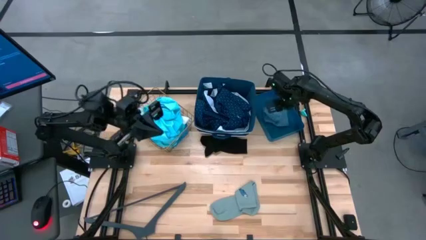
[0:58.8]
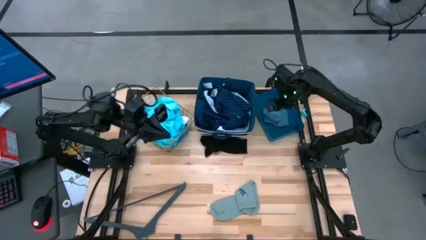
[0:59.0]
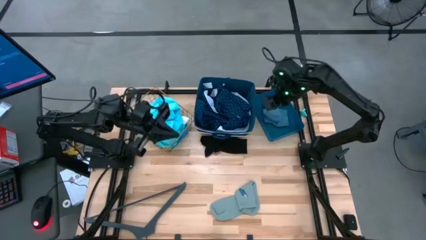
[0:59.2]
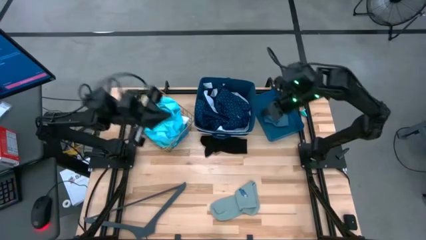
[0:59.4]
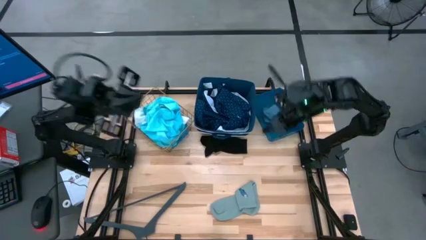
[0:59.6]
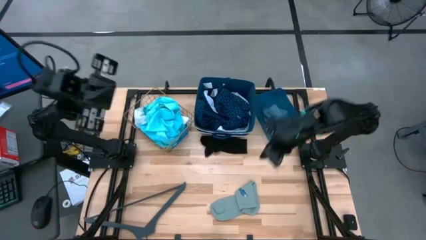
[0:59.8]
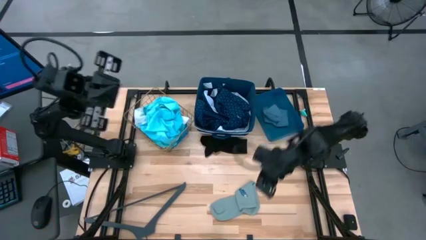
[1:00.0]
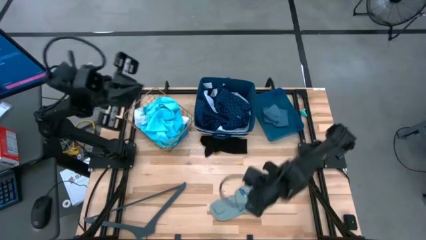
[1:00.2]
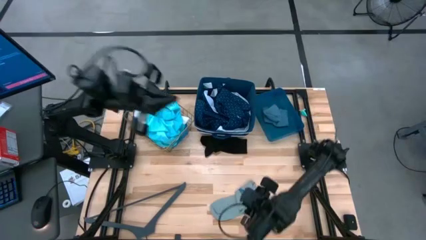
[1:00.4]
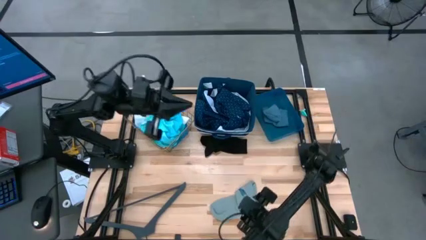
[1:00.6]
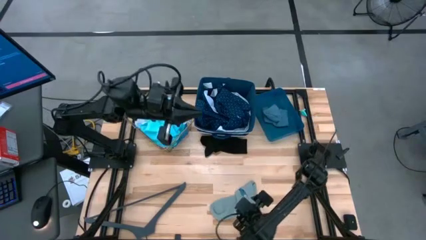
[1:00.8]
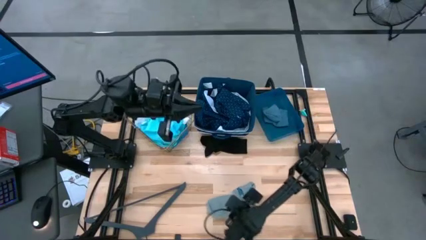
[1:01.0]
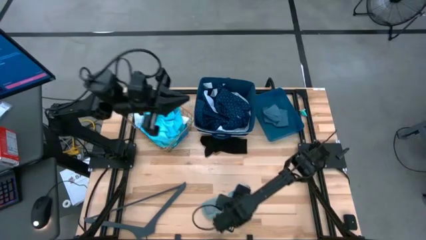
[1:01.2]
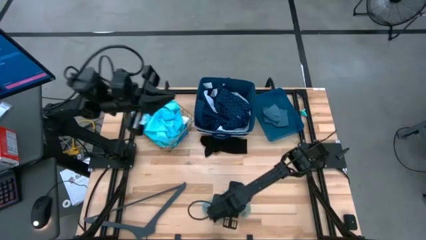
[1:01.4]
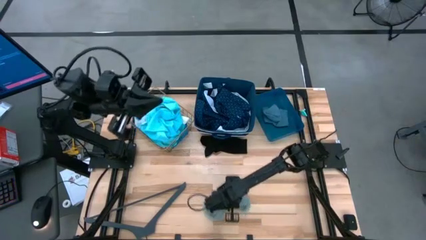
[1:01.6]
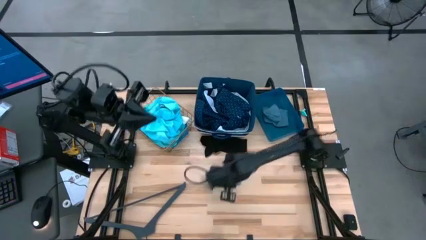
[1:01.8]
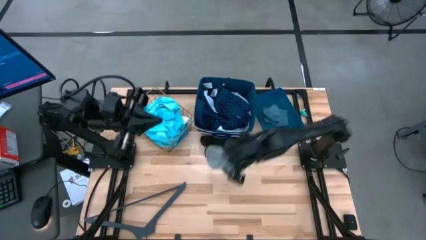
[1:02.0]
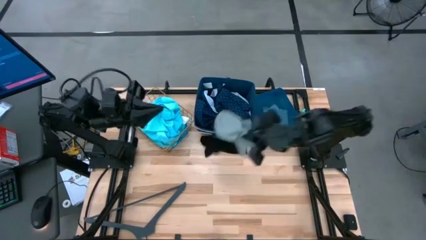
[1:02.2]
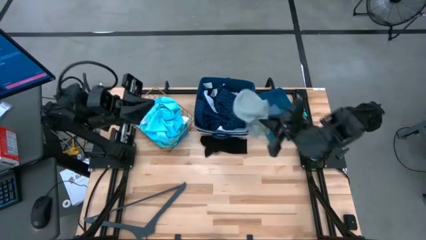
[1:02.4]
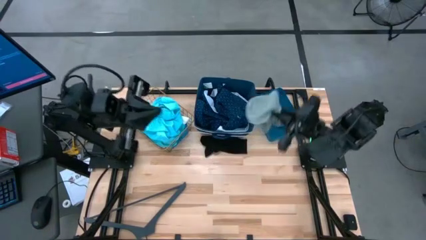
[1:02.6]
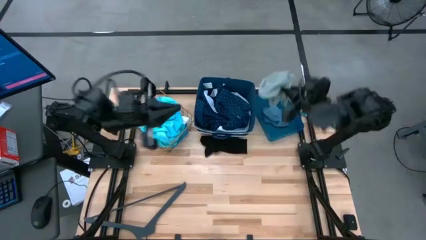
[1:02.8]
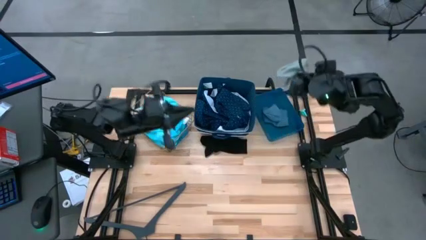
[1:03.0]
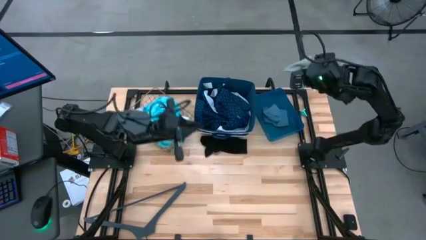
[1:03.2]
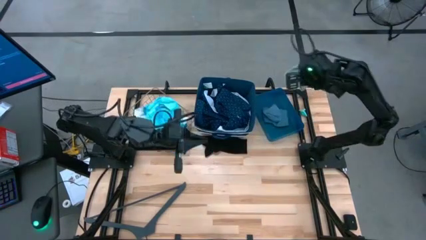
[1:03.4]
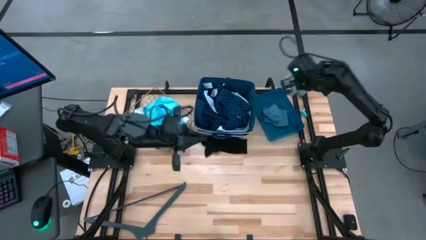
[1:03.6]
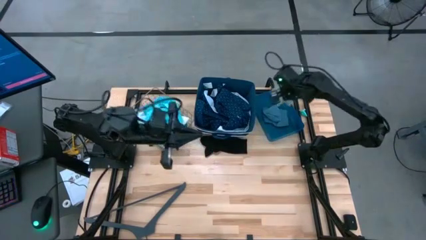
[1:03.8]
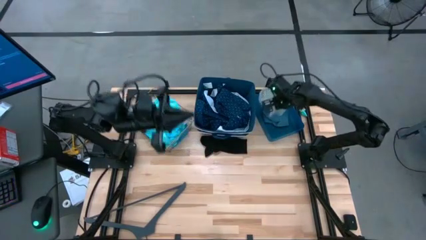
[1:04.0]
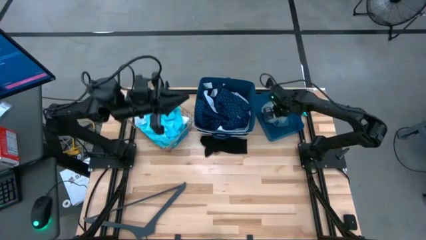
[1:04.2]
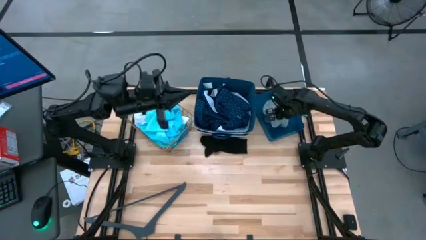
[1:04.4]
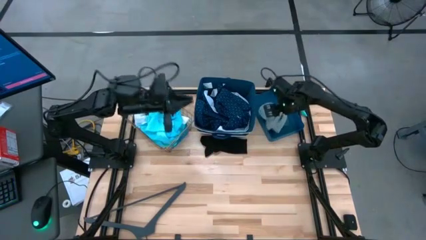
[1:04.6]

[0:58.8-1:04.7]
Task: Pick & Place Cloths
Put the gray sock into the blue bin

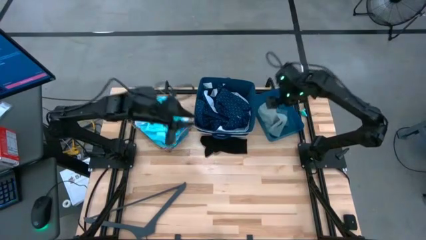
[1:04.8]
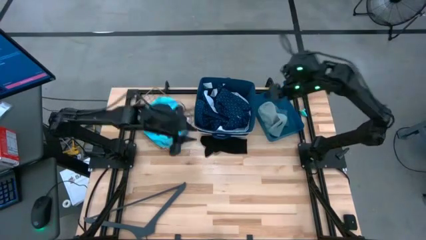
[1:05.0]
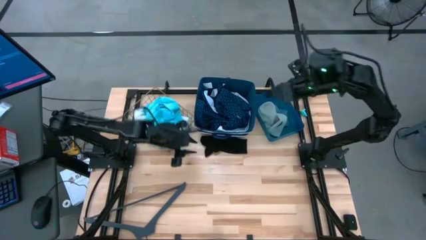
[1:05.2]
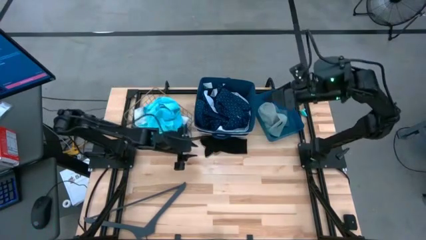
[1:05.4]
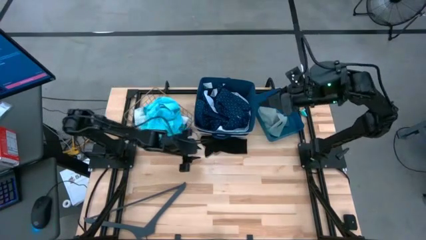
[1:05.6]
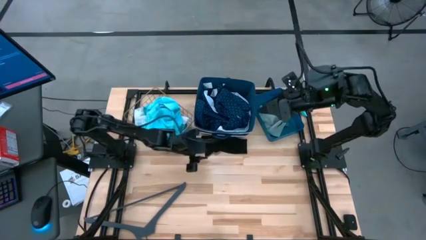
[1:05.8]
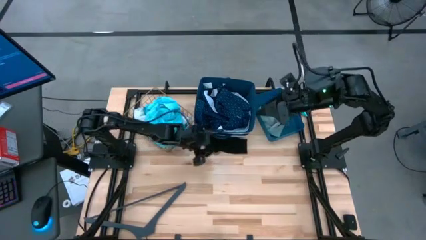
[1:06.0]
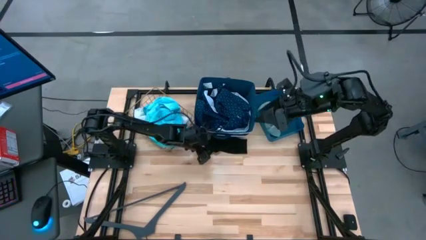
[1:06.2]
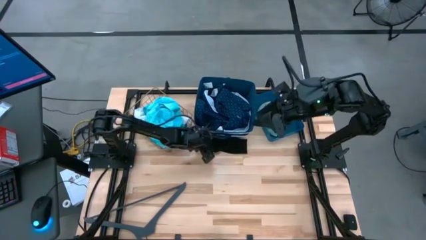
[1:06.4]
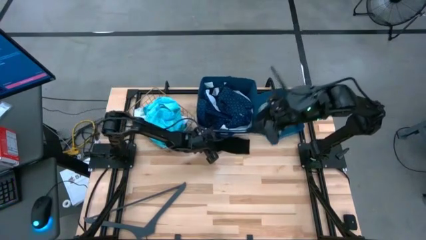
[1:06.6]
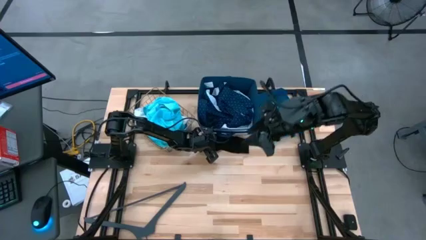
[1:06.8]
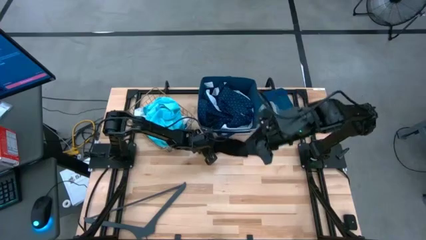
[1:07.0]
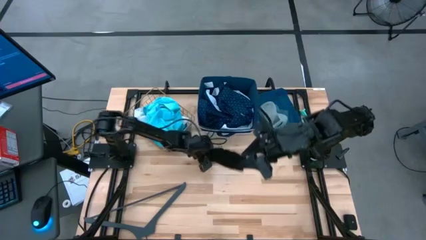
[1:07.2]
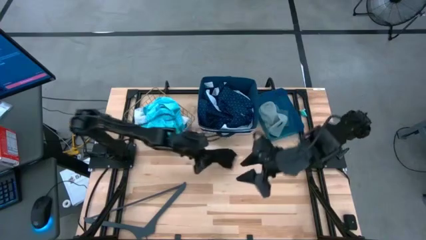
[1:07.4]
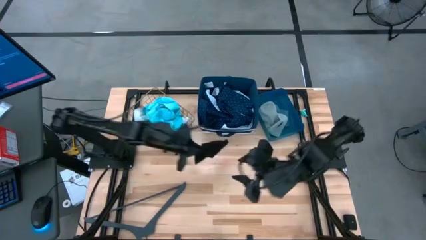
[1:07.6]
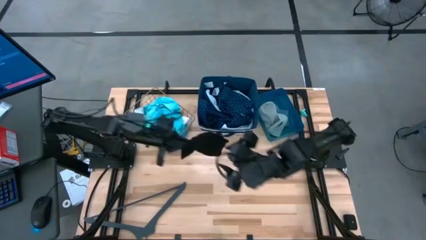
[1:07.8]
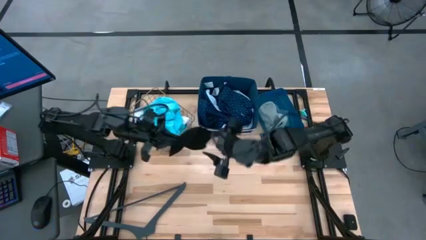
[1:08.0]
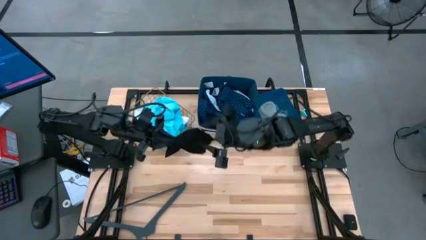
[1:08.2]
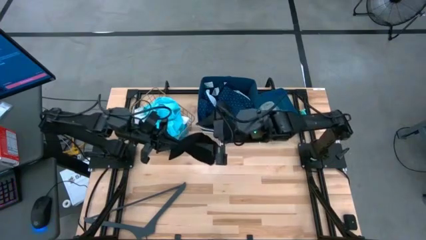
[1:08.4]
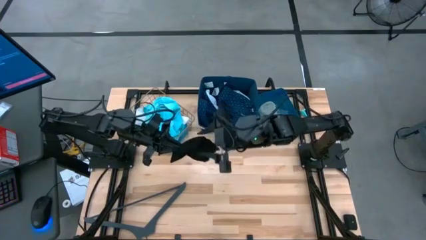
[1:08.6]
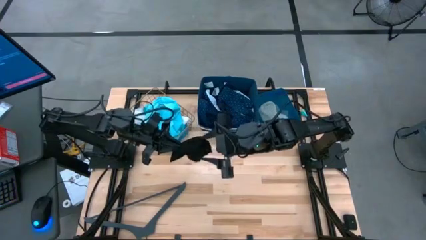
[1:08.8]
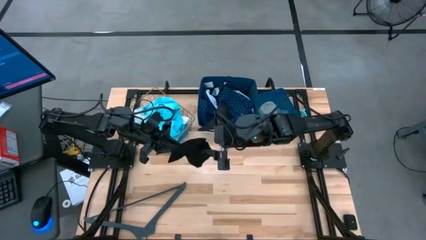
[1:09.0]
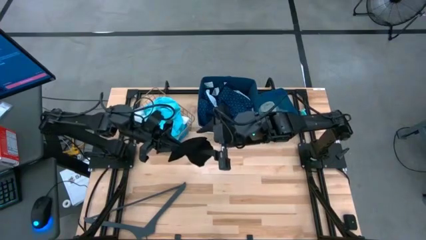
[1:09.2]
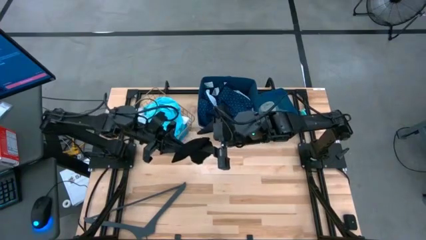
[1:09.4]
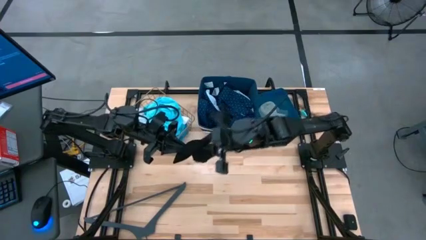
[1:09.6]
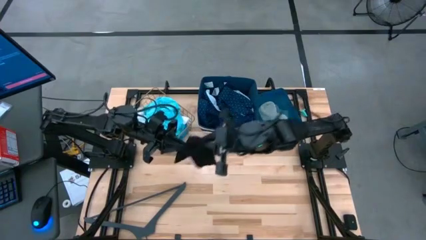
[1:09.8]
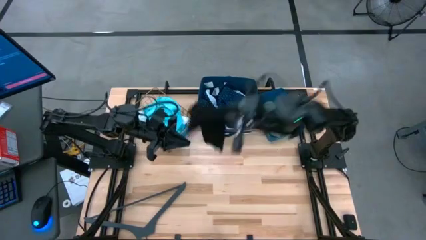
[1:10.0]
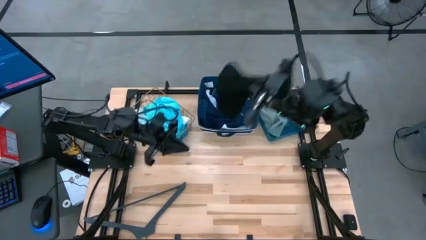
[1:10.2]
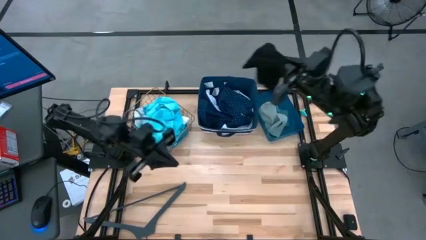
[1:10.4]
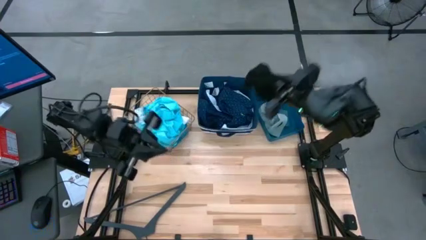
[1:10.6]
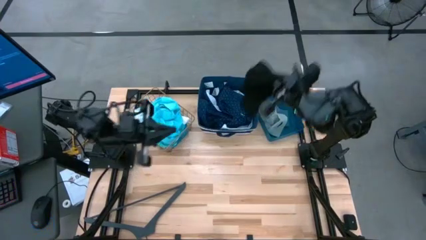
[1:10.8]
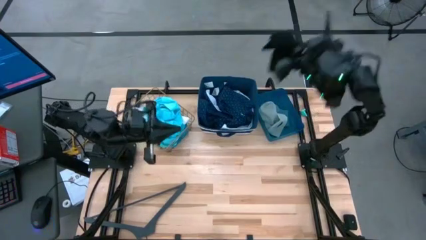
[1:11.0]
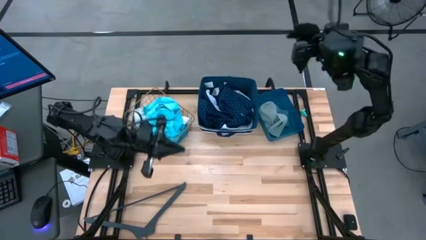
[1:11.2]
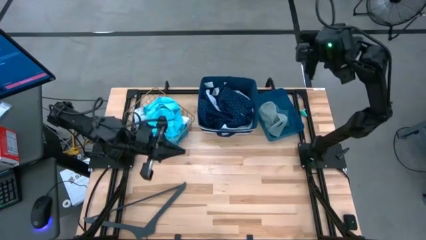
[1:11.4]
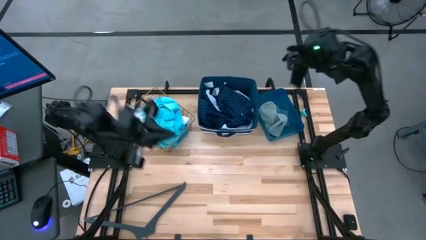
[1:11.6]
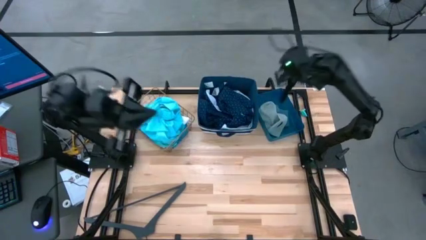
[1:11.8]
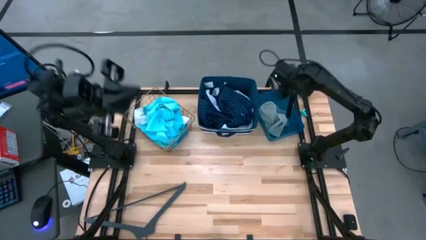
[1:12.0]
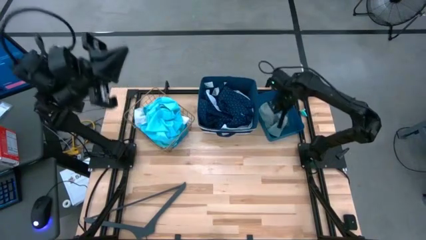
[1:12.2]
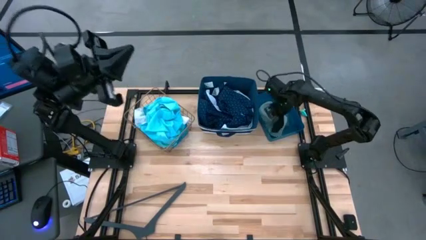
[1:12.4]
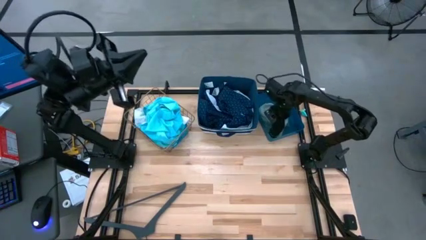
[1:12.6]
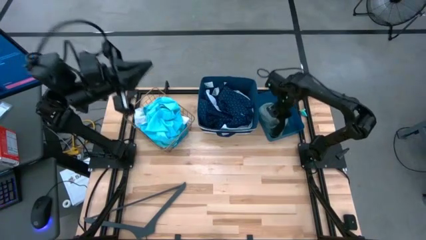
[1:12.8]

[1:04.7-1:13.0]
Put the black sock into the blue bin

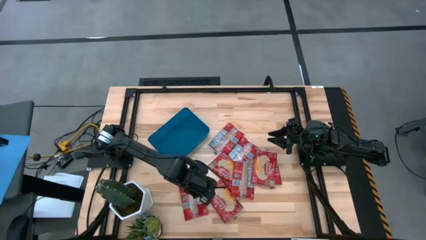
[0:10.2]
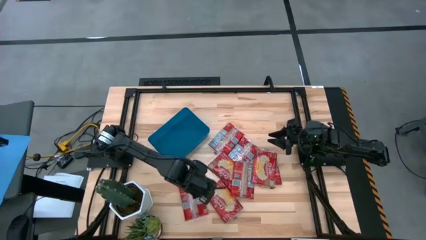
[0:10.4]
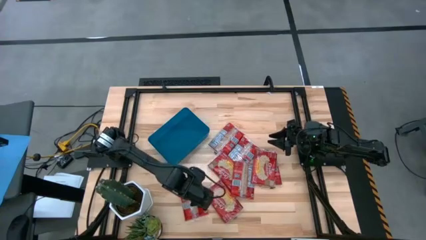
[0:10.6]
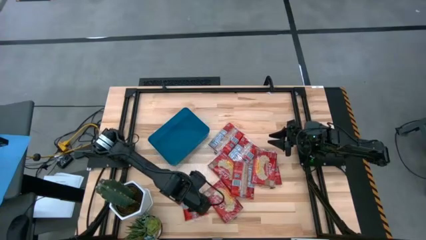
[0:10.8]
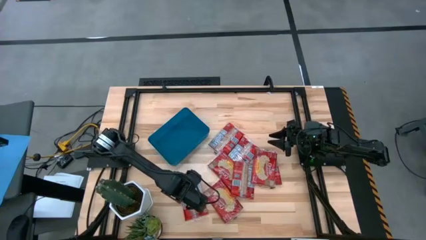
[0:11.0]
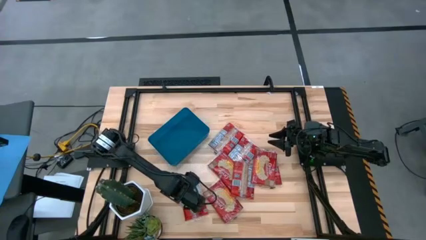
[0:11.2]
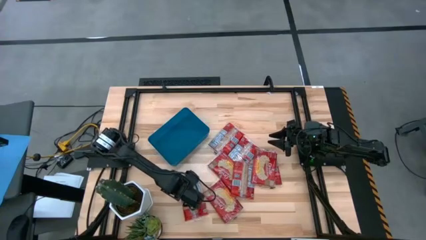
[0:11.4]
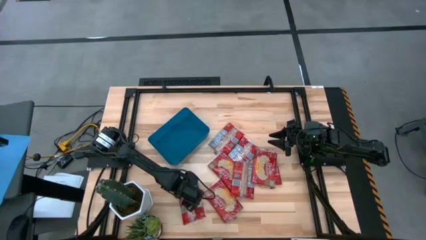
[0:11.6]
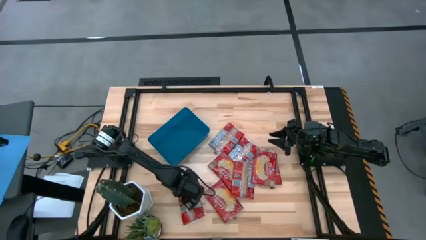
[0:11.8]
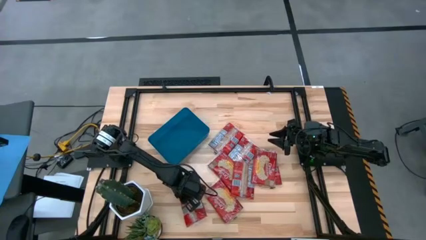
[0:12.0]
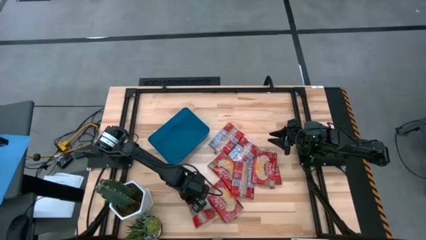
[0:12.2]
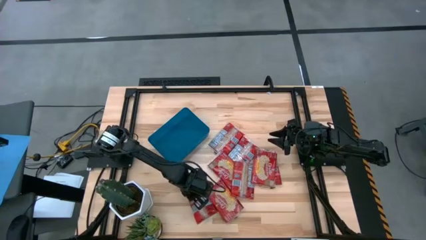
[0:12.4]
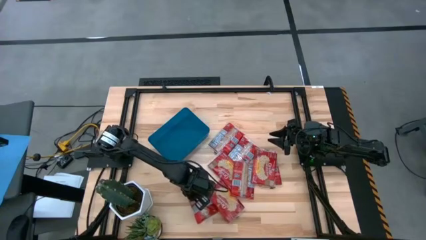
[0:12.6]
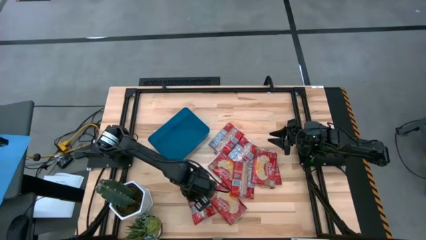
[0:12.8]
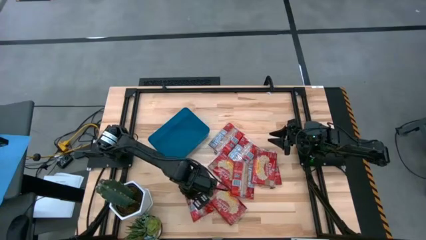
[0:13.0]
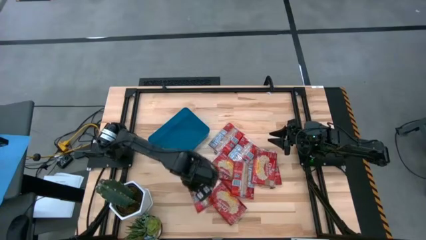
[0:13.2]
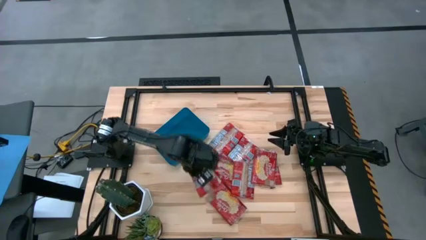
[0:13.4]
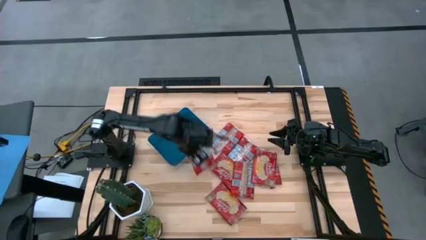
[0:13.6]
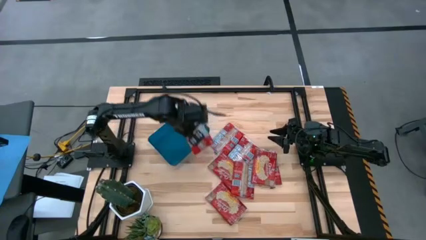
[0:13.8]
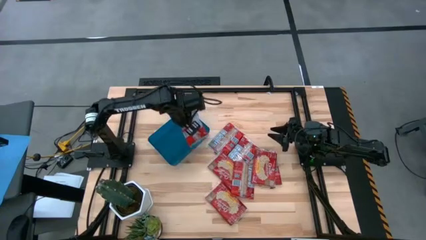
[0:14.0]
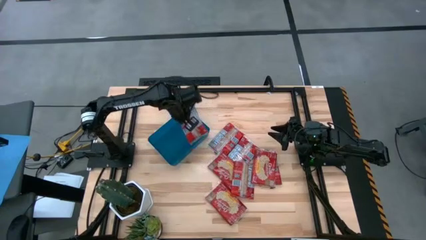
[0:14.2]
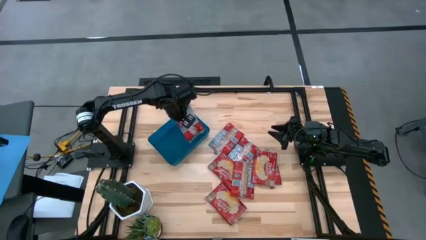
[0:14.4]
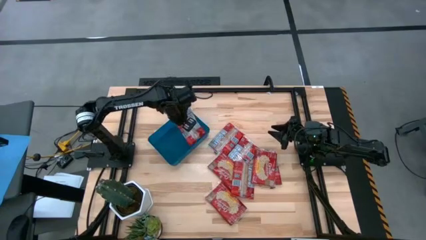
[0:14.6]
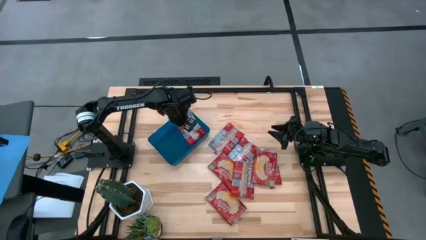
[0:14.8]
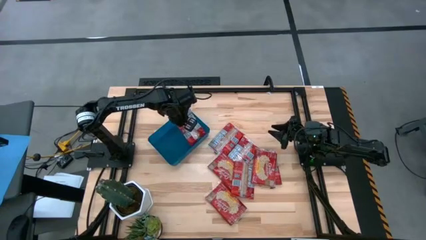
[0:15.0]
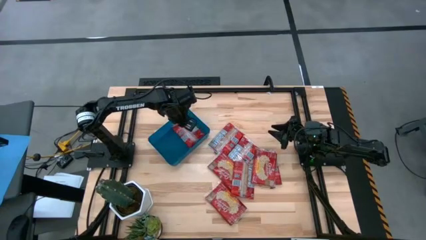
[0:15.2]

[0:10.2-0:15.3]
Task: Sort popcorn bags into baskets
Put the red popcorn bag into the blue bin
